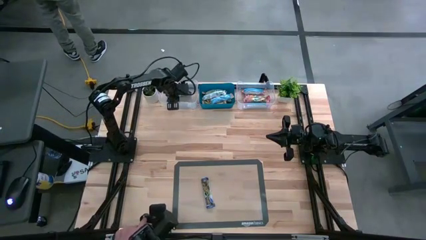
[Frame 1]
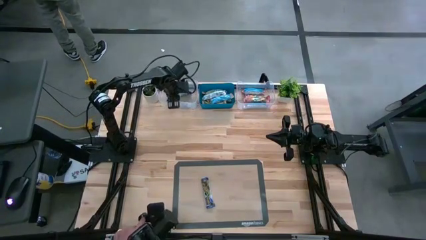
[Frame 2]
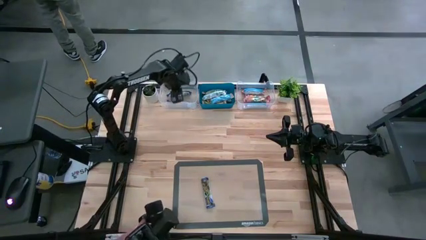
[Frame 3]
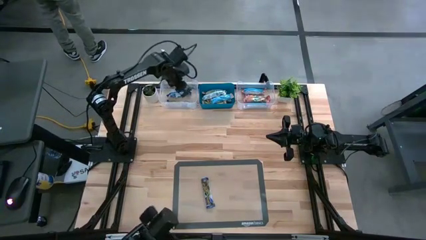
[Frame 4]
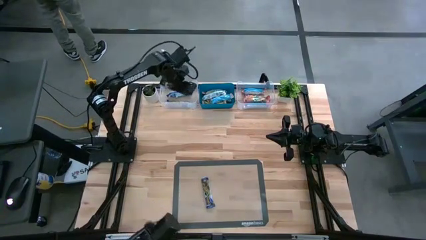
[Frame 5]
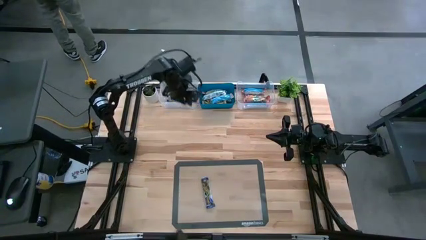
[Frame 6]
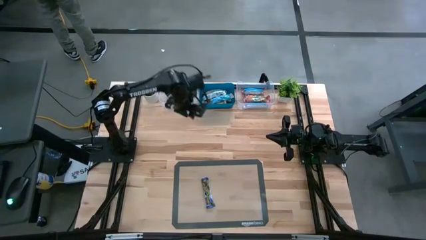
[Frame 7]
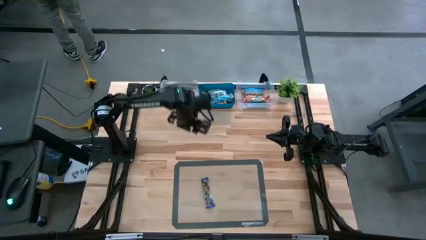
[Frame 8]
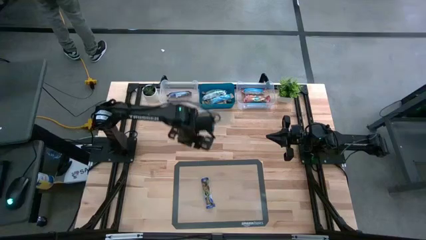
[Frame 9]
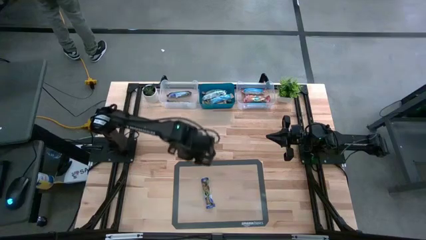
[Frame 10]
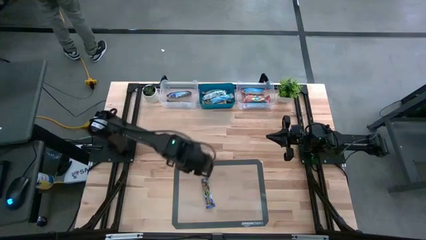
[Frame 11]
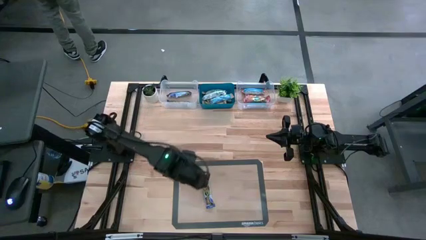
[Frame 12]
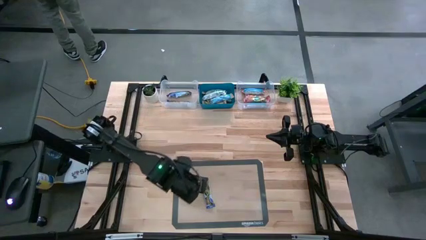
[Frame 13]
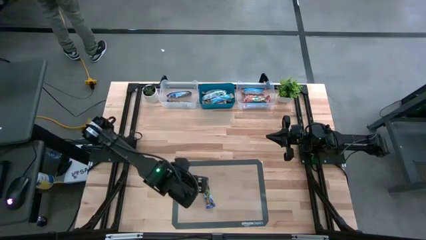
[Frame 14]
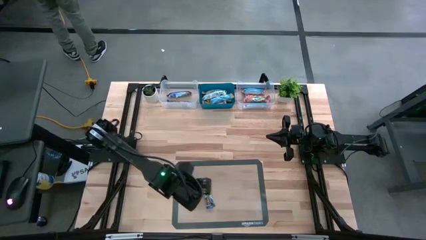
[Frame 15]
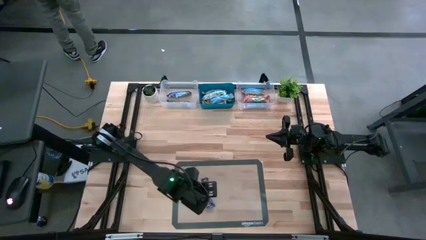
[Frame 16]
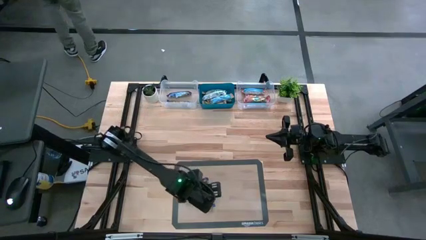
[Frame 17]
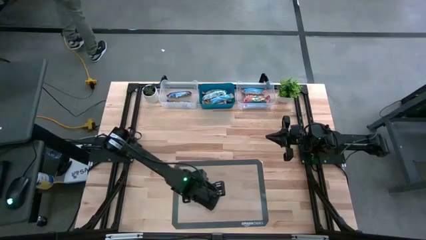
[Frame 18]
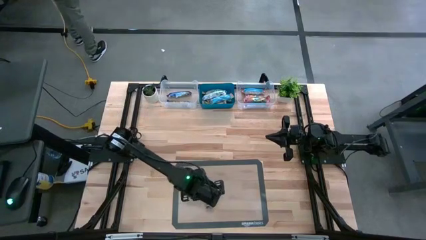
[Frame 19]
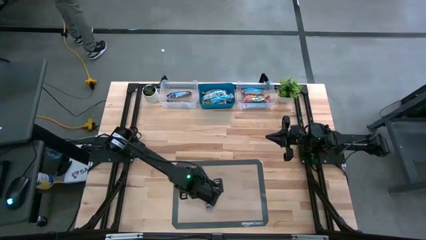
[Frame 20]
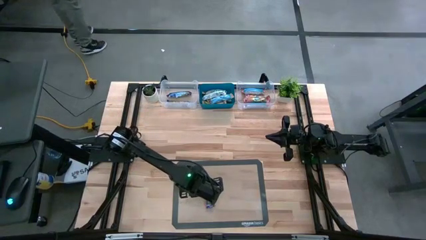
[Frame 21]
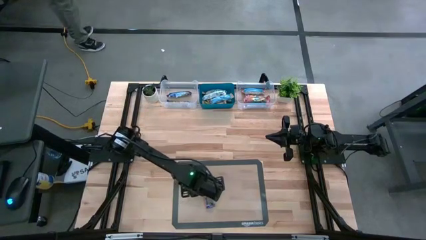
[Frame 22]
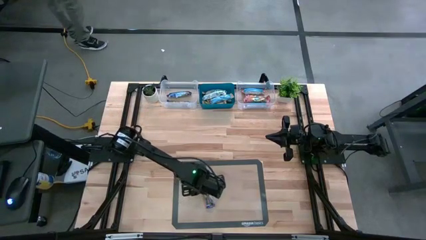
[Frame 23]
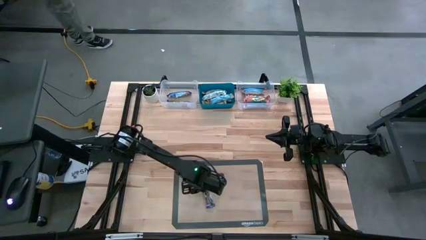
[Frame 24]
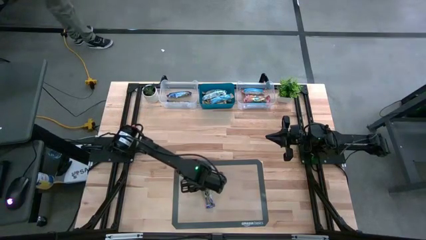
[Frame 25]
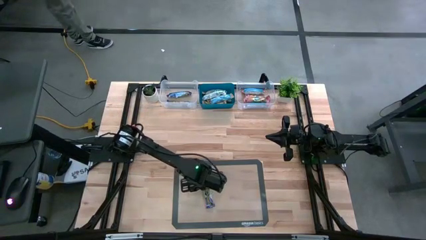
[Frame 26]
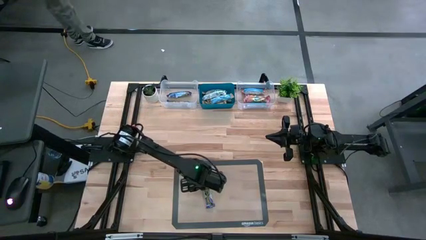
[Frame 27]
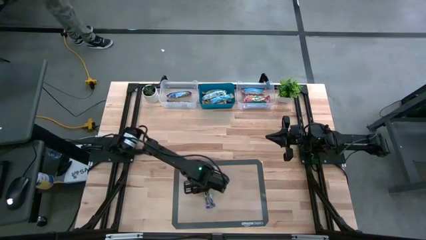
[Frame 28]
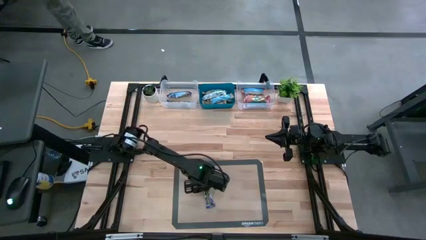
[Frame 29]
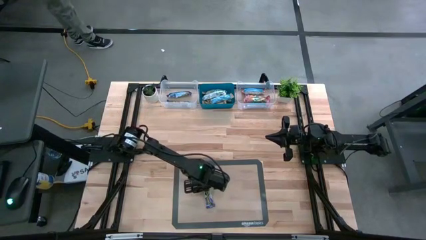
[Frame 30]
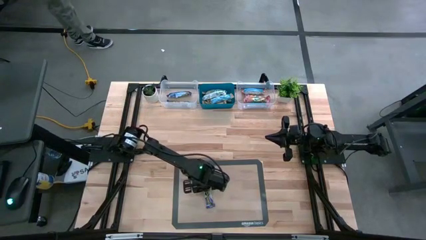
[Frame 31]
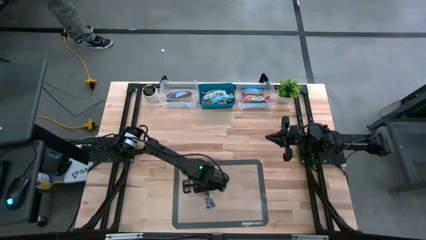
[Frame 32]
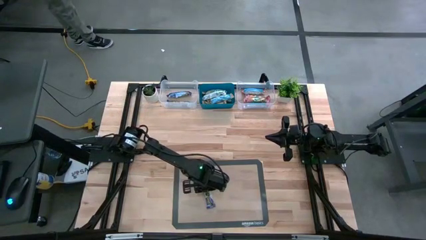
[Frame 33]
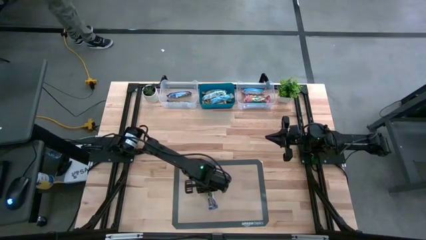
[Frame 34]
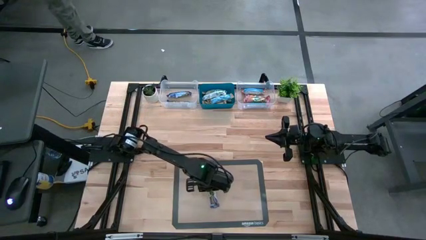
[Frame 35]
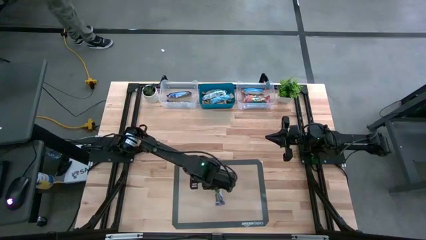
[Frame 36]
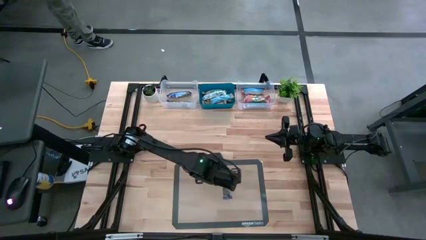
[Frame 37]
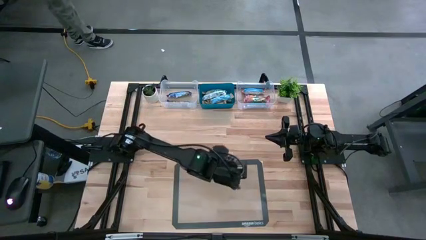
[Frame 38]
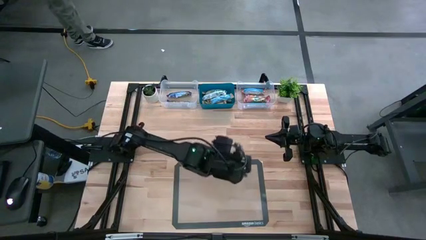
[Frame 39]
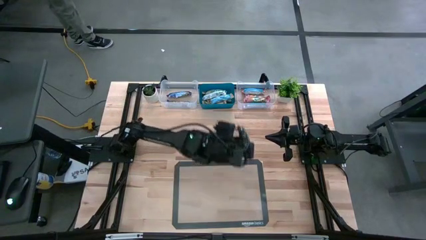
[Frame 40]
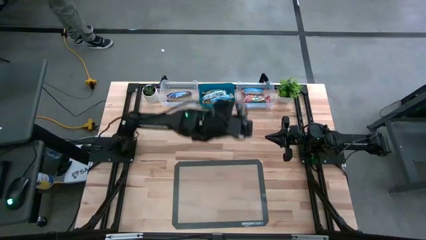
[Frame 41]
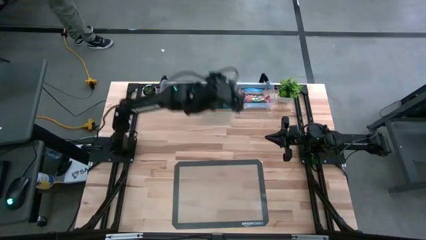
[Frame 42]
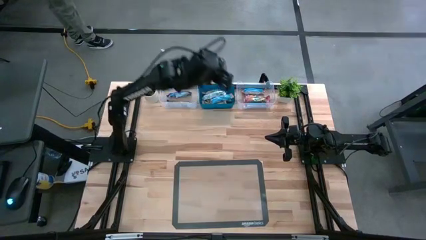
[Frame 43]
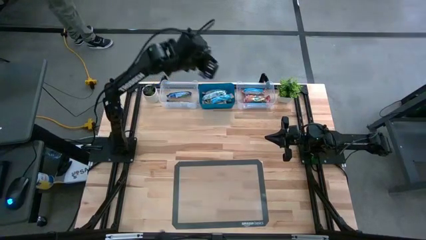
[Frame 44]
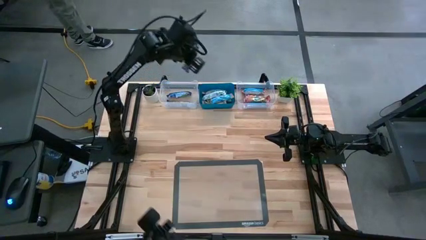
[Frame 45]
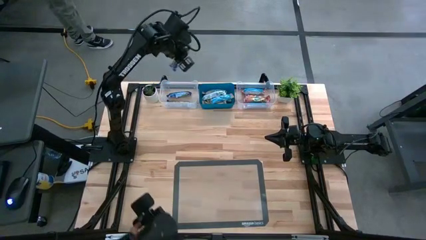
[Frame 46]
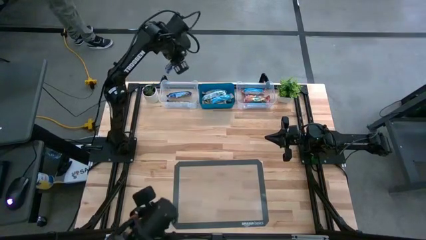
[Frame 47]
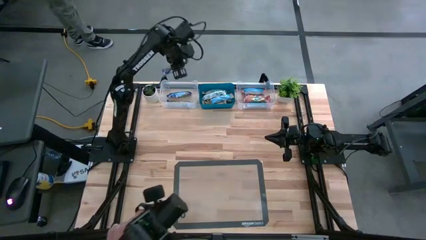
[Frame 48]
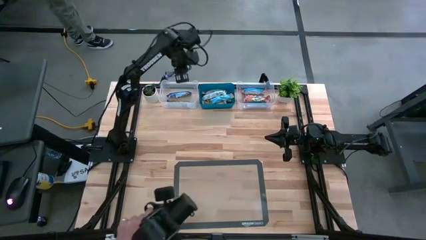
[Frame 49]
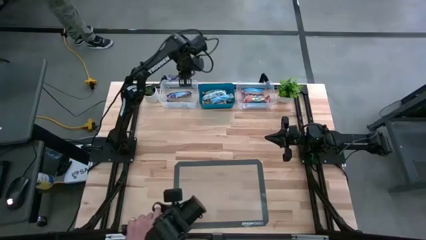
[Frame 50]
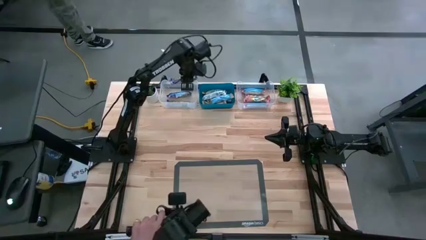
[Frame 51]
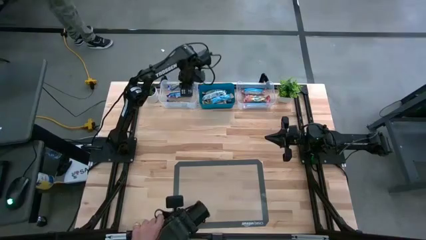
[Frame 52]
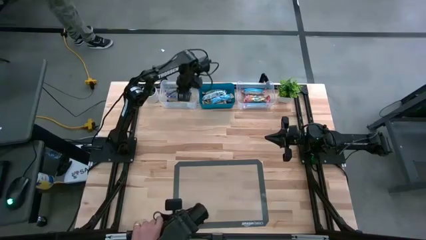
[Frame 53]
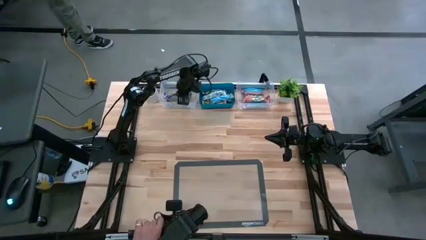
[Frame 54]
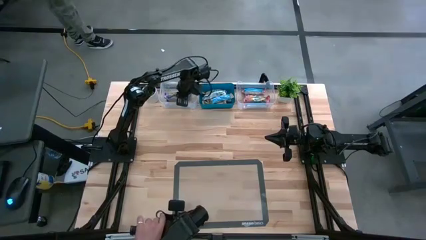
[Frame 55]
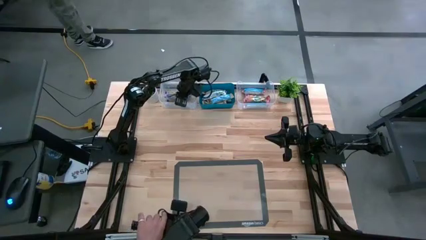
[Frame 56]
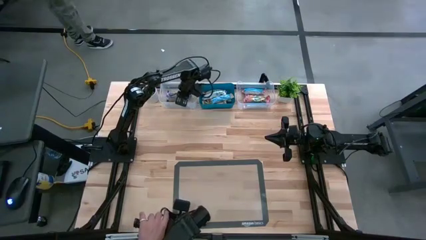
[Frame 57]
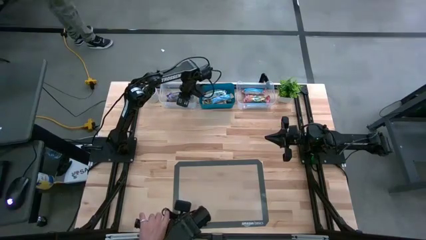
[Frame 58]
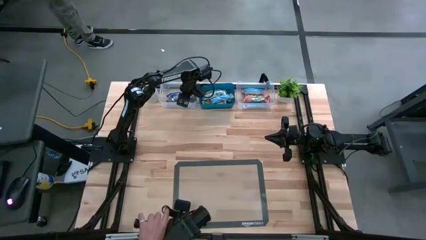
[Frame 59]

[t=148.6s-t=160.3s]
Task: Pick and place Granola Bars by type
Put the blue granola bar into the left transparent bin

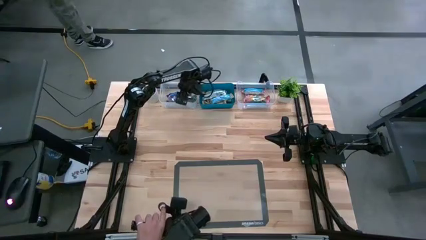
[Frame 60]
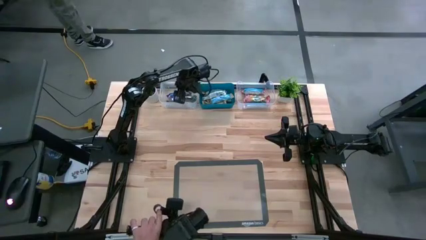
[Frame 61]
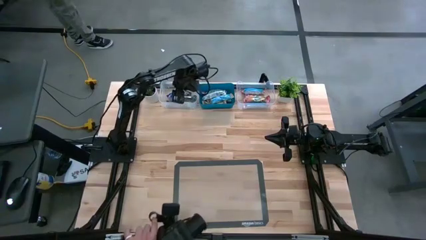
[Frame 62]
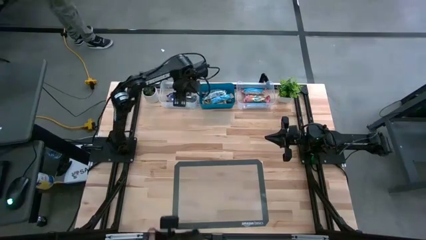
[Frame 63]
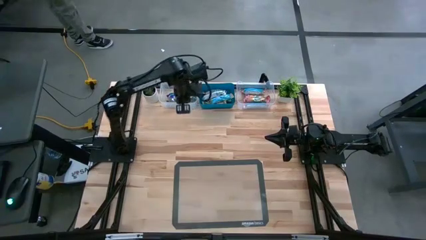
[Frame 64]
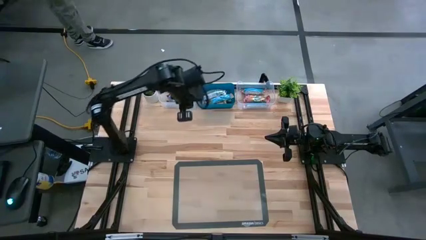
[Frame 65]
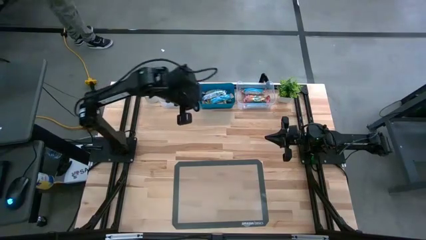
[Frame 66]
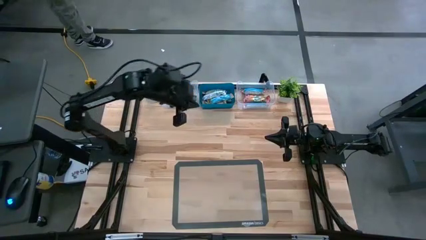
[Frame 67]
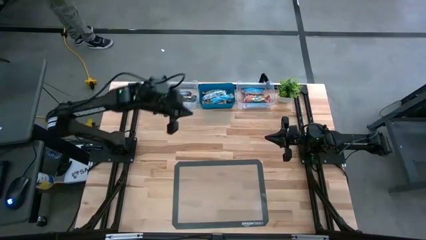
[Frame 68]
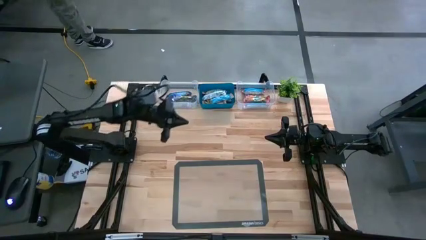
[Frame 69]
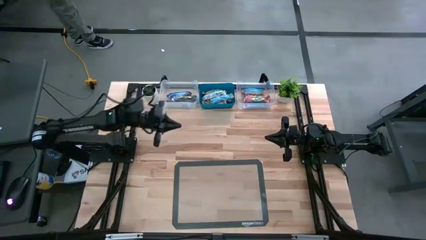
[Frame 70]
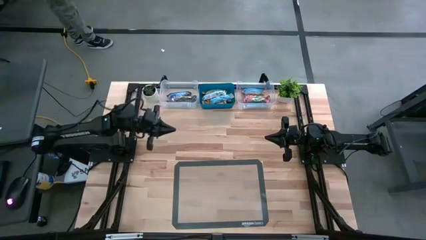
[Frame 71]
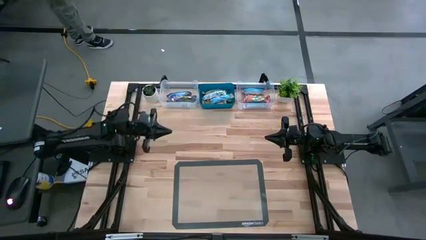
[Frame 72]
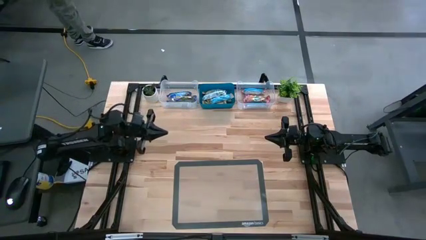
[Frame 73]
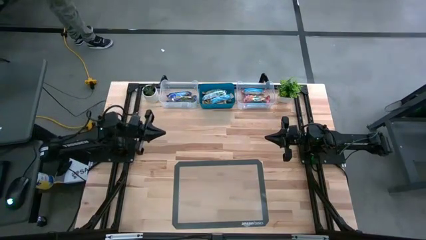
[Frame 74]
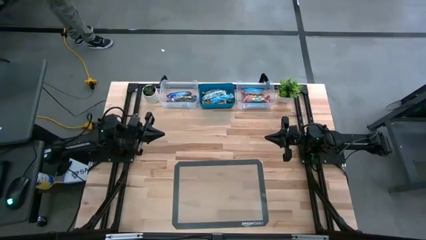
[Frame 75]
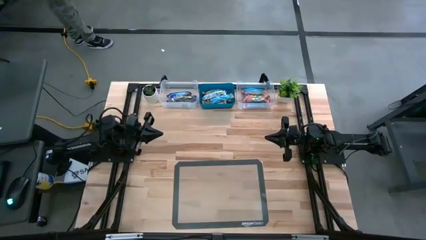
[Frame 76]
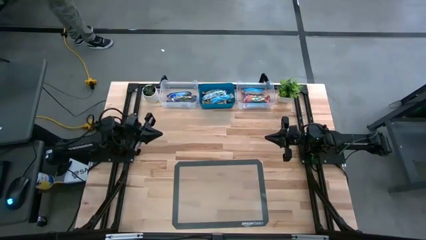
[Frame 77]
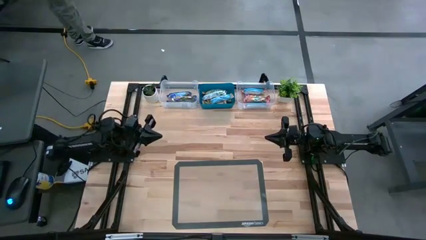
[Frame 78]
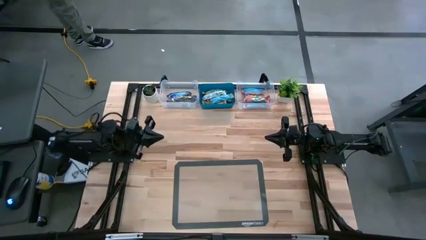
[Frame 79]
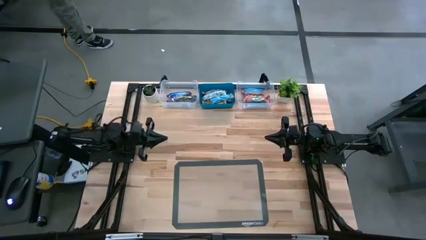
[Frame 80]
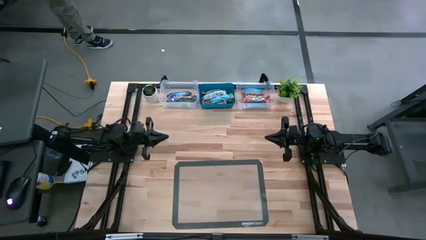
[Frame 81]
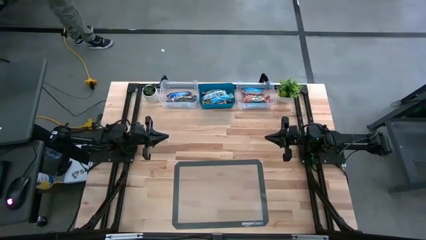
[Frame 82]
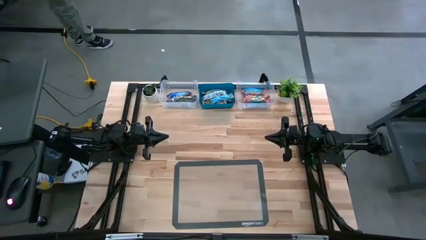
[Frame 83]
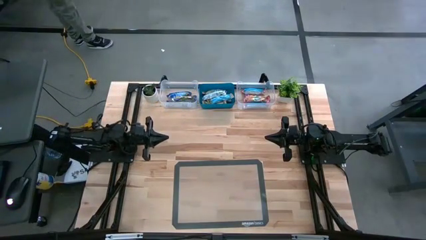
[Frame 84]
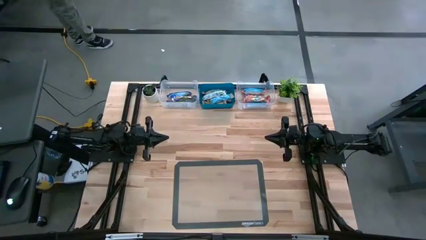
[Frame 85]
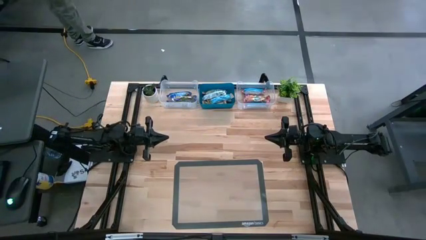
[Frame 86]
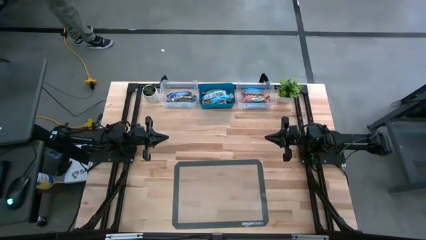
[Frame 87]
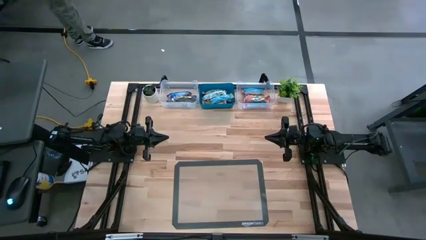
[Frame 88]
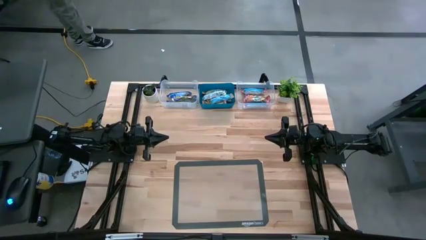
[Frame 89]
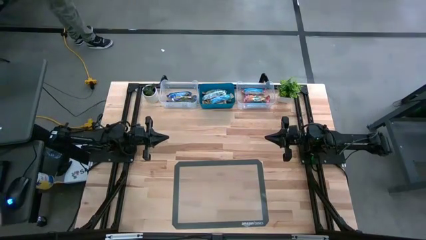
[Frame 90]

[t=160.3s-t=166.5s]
Return to Home Position
